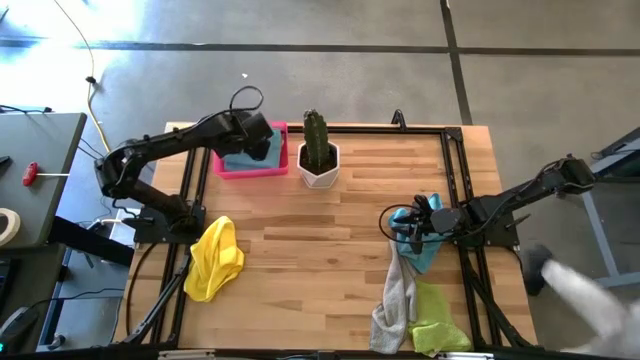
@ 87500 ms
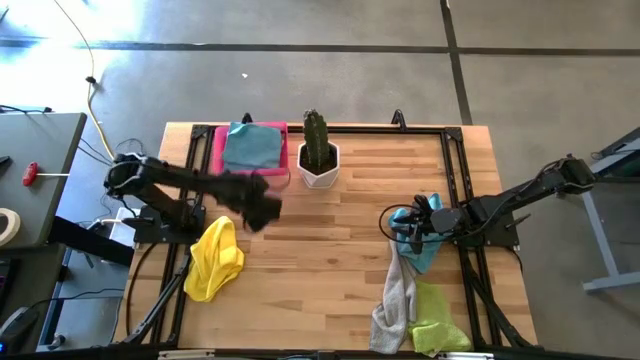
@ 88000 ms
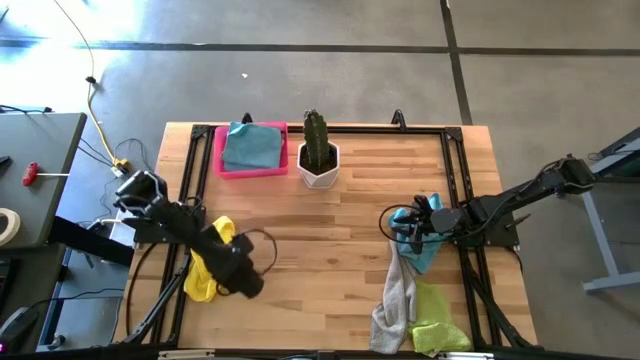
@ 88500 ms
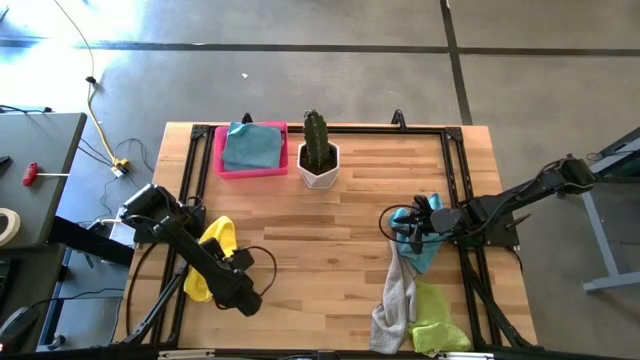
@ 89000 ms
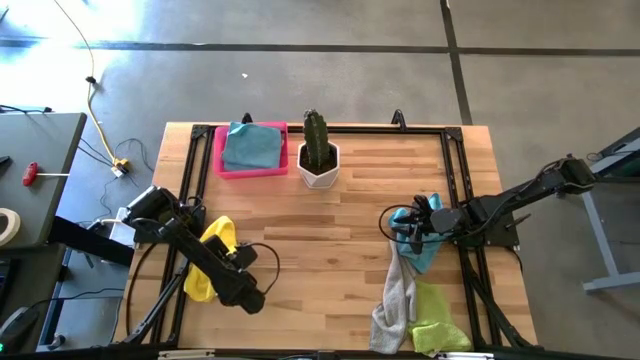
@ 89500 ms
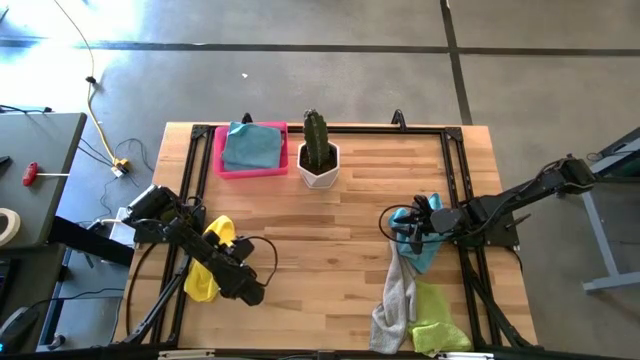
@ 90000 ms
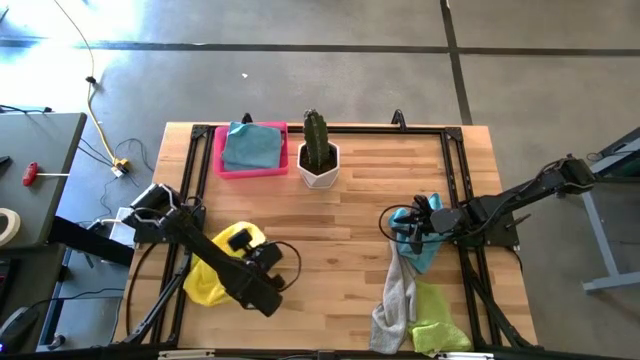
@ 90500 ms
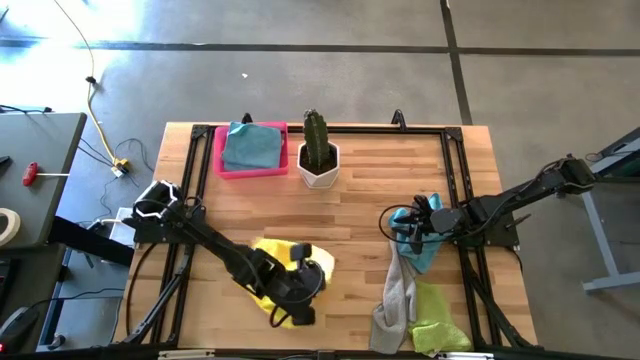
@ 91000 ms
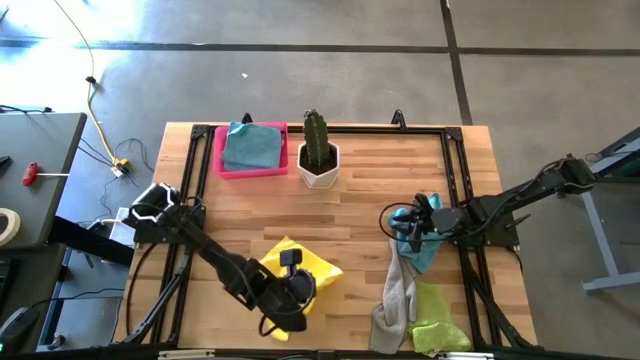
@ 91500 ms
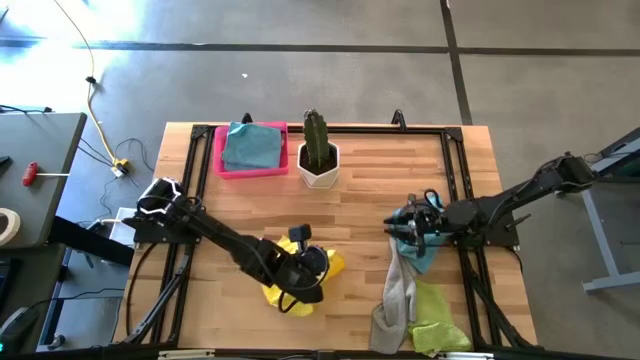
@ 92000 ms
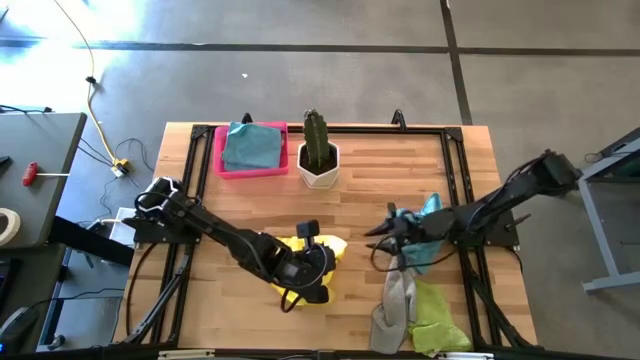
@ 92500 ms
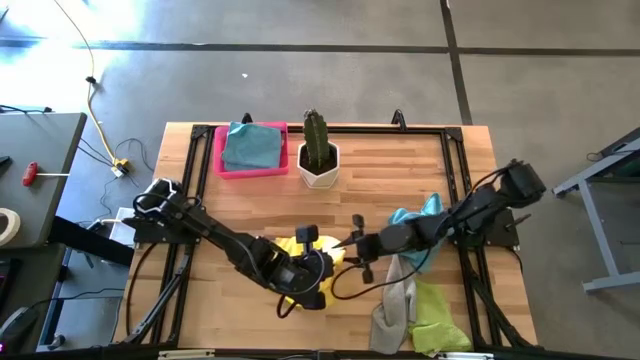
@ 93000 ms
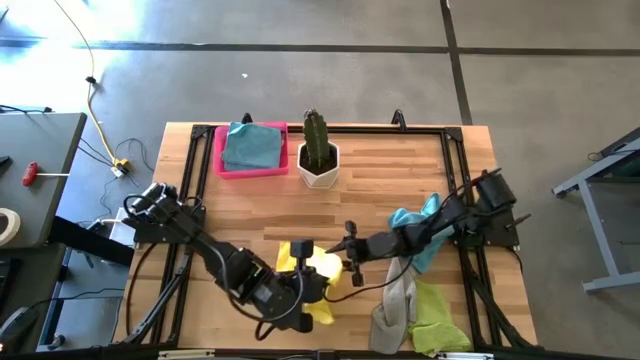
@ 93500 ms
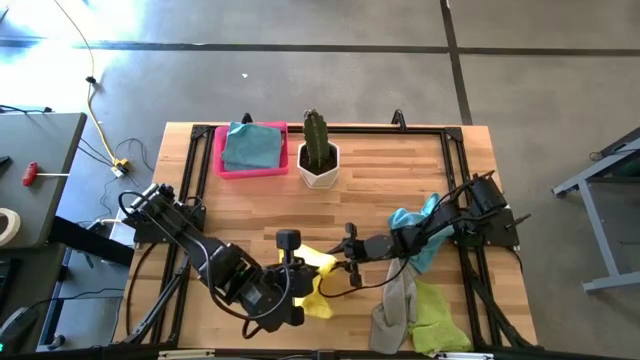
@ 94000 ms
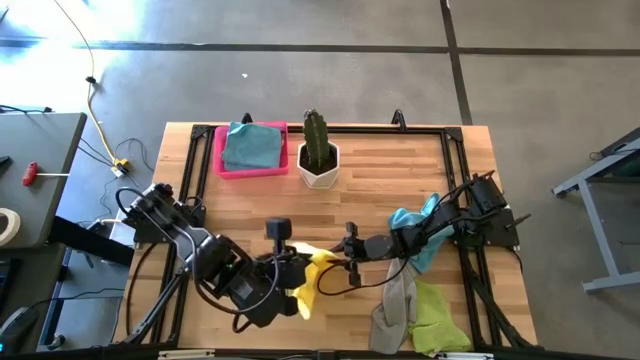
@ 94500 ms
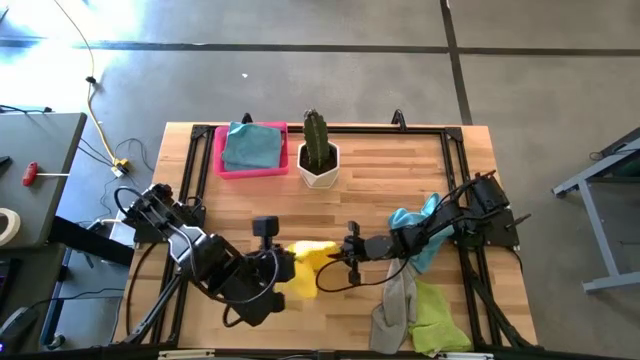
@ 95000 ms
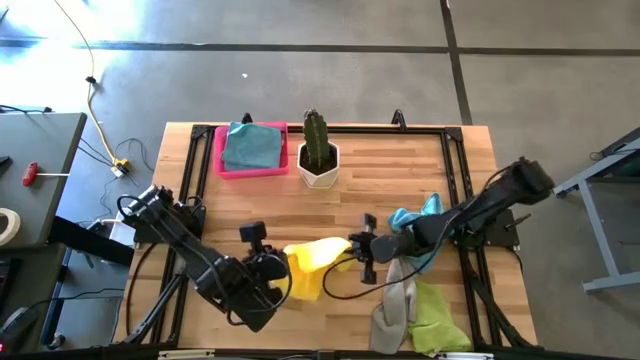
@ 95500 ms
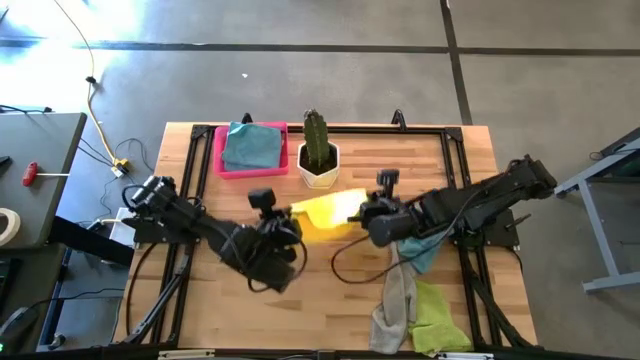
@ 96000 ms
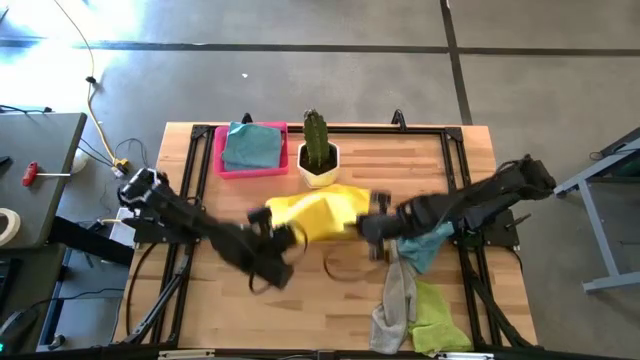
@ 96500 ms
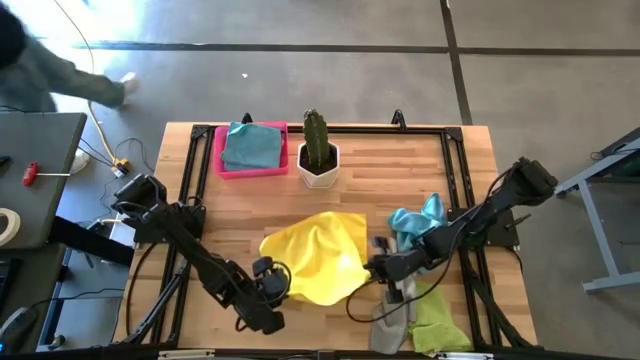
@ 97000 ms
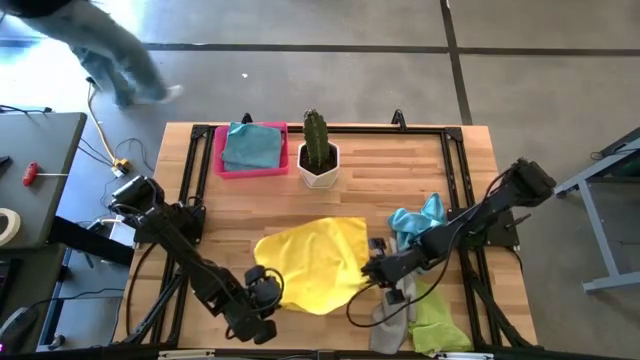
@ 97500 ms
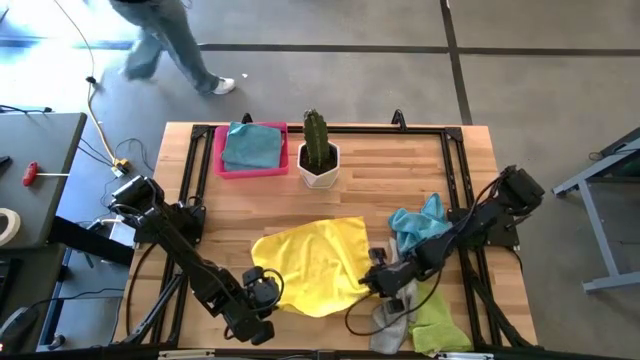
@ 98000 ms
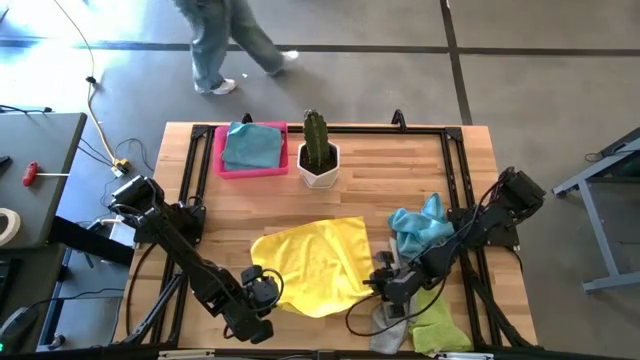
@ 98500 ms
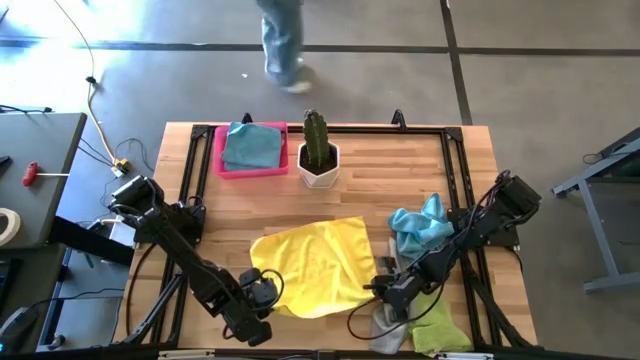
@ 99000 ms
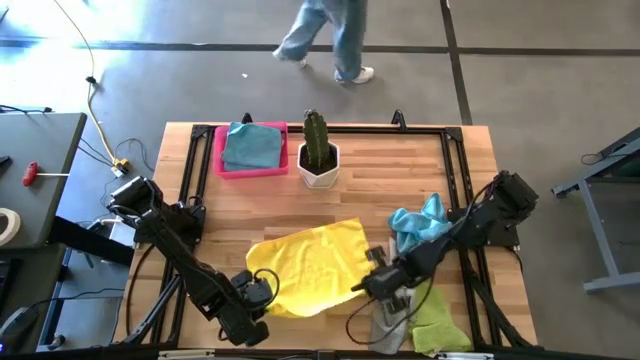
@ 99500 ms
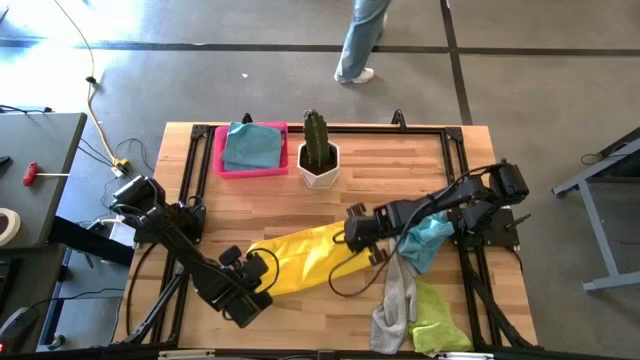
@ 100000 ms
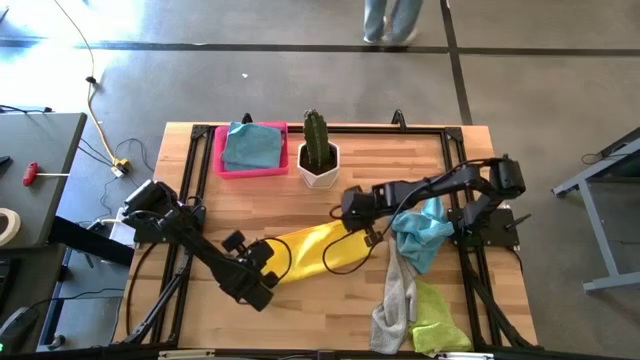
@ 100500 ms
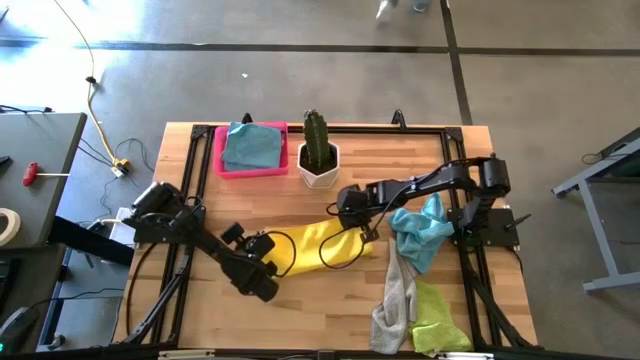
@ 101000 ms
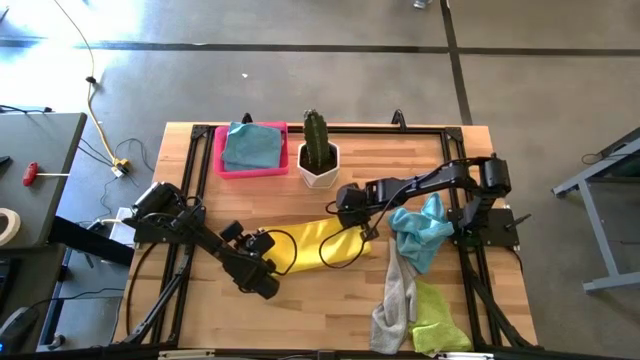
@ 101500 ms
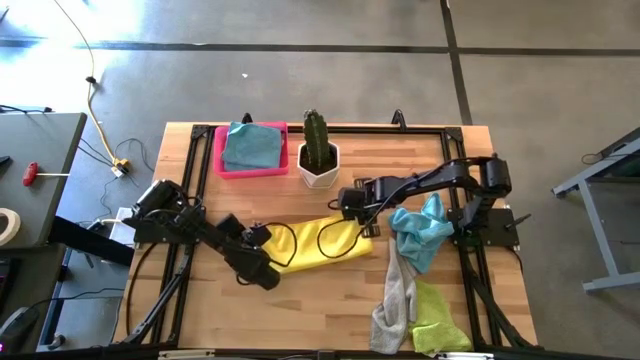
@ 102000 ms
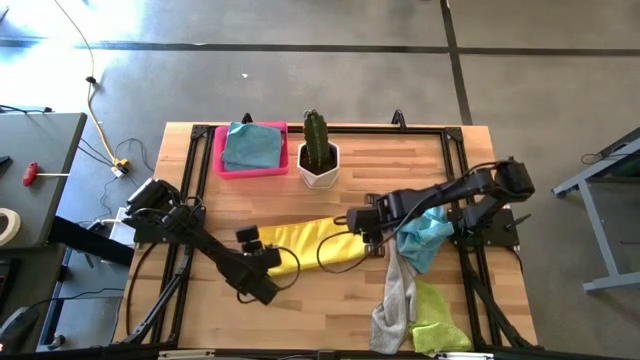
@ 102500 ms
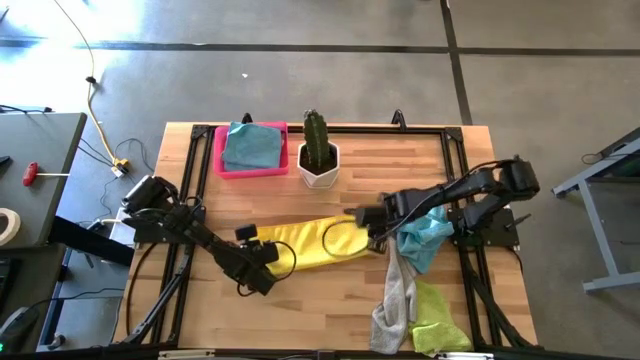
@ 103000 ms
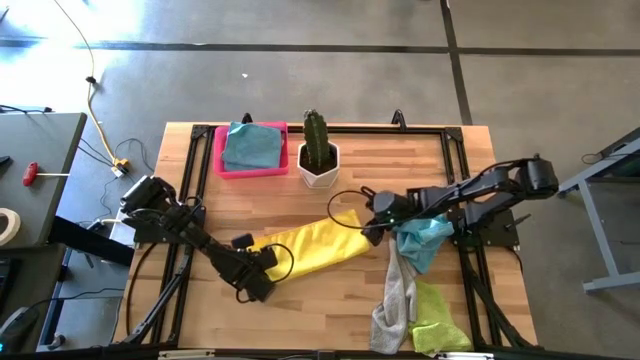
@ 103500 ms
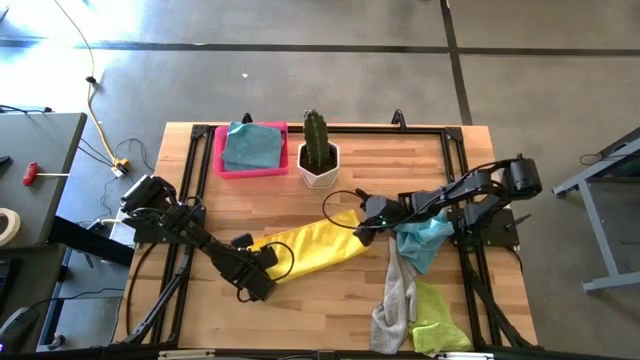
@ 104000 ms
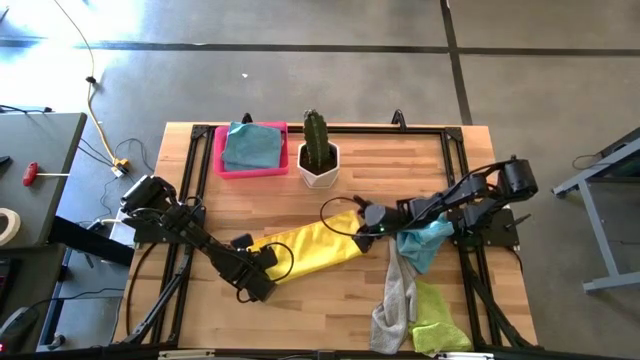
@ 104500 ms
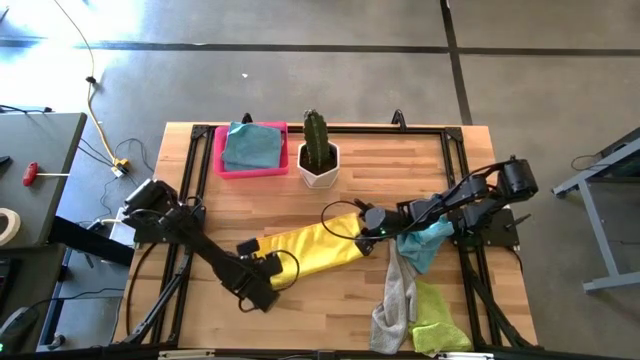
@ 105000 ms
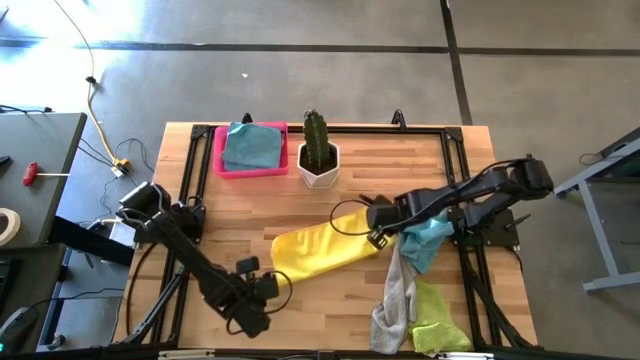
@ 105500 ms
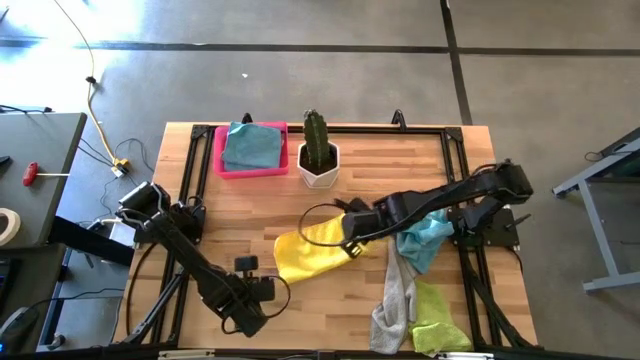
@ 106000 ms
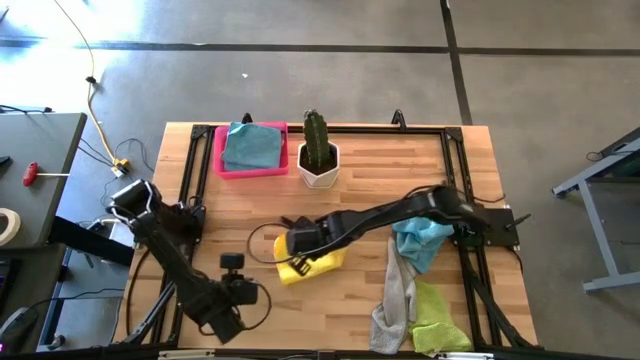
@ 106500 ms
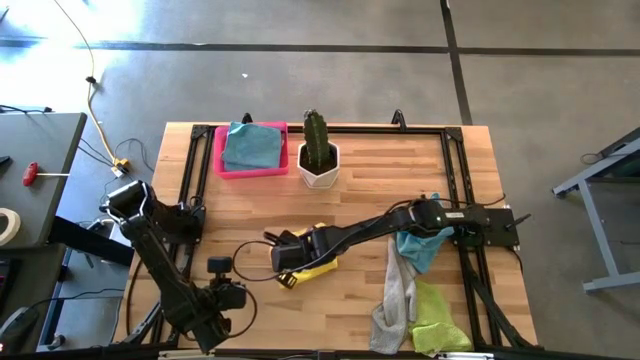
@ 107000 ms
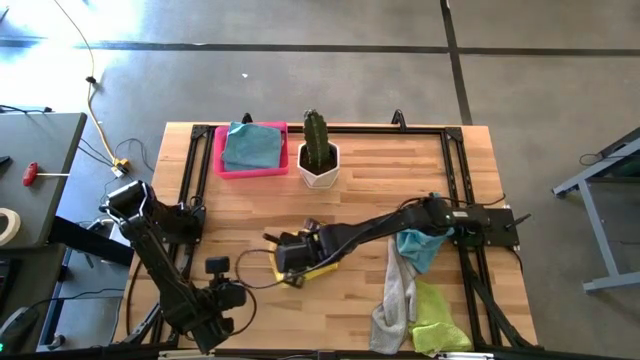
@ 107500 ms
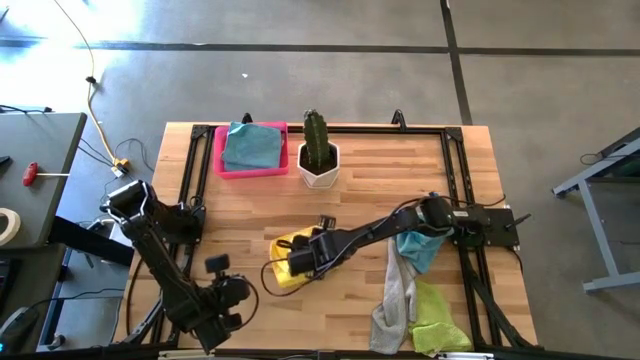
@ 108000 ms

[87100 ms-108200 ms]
Task: Fold microfiber towels
Fold the yellow microfiber towel

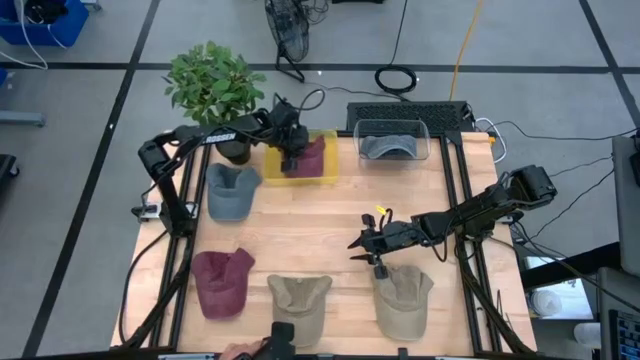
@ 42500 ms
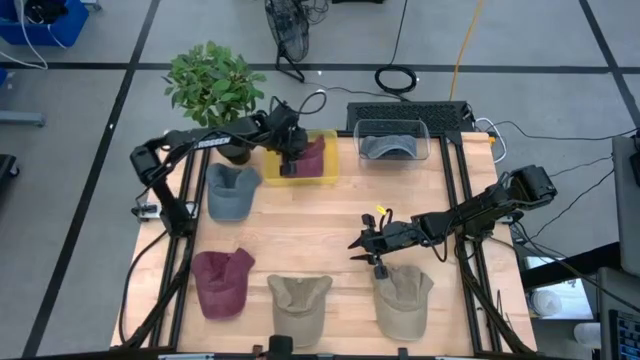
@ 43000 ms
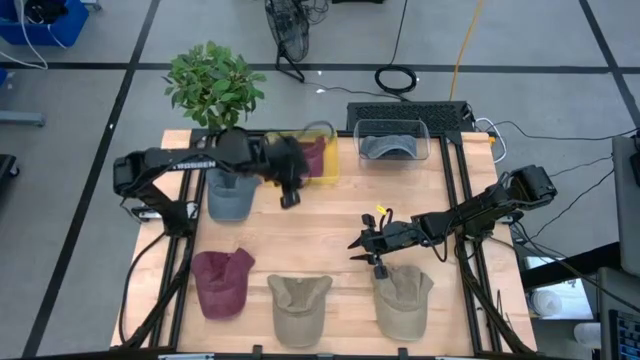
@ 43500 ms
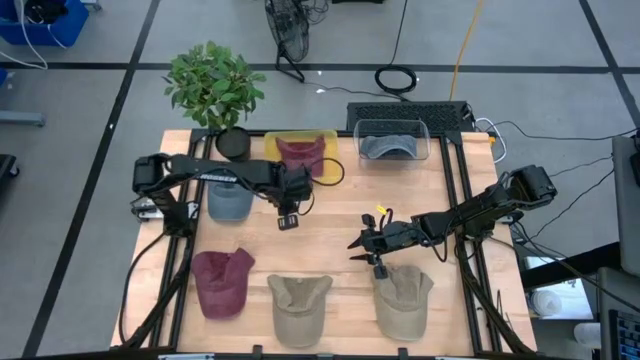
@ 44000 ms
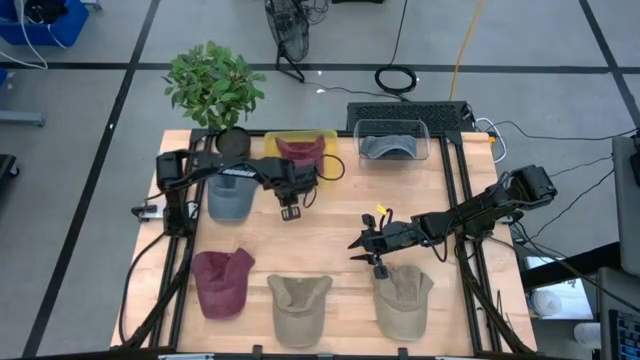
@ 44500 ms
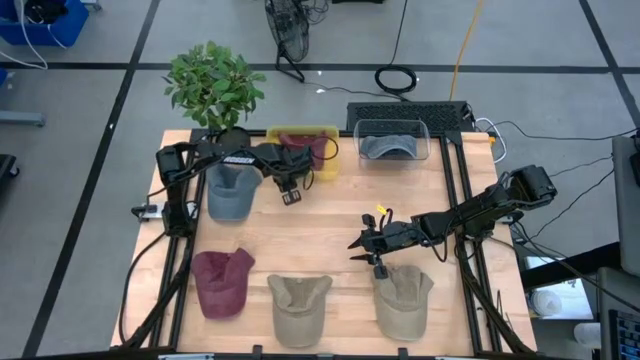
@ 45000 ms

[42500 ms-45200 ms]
Task: Pick & Place hat
Adjust the yellow bin on the table
